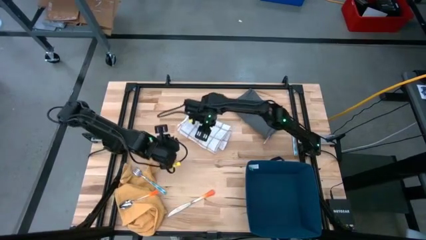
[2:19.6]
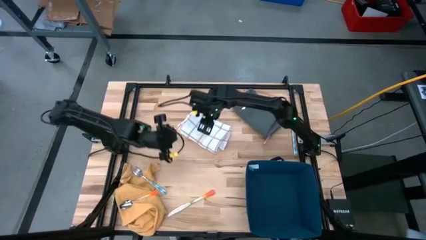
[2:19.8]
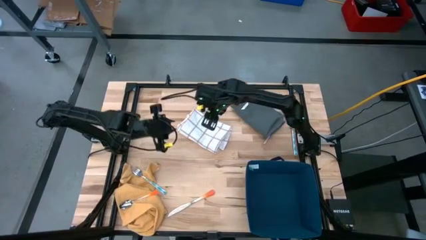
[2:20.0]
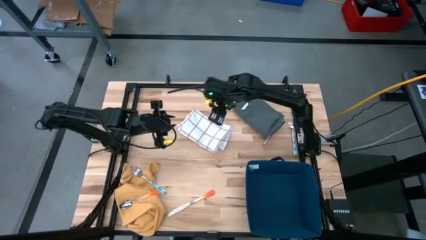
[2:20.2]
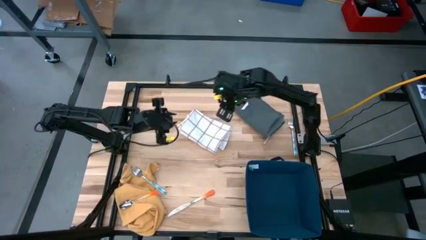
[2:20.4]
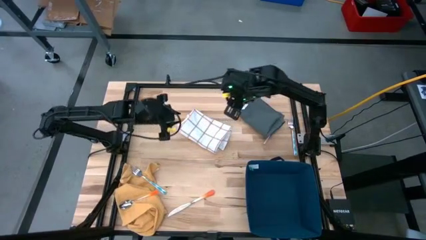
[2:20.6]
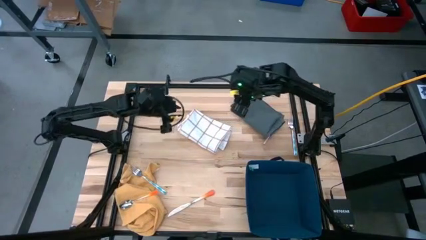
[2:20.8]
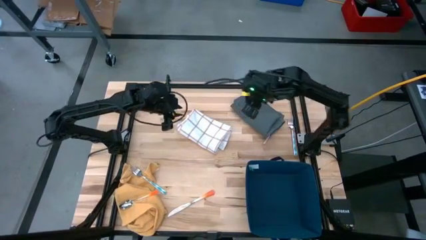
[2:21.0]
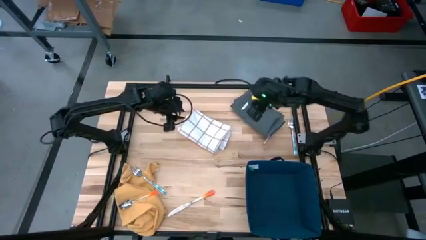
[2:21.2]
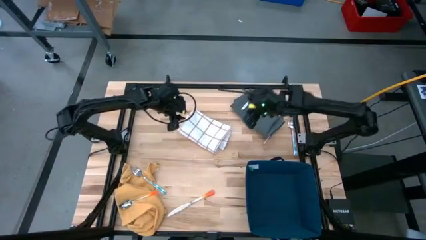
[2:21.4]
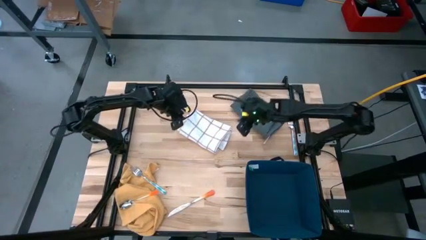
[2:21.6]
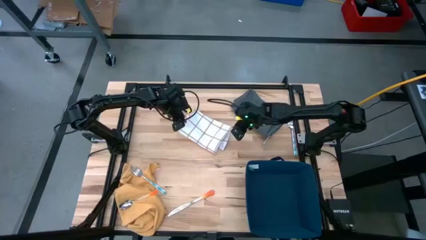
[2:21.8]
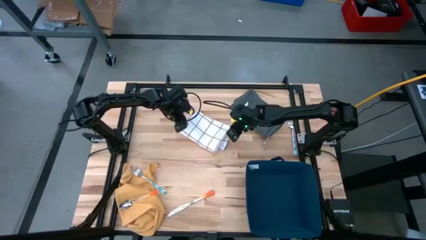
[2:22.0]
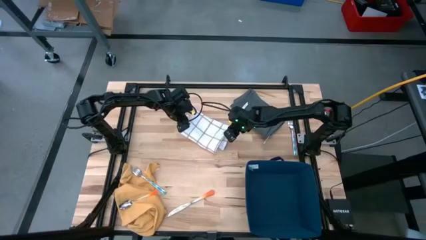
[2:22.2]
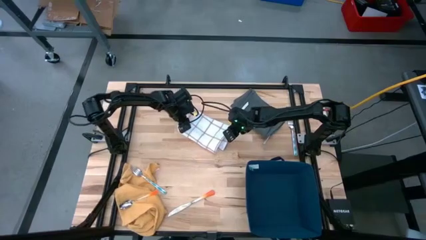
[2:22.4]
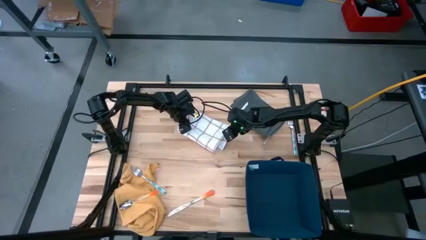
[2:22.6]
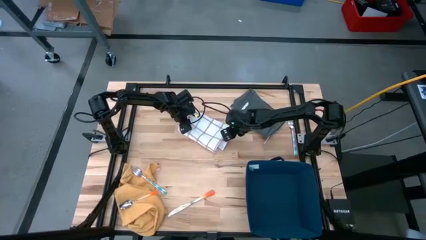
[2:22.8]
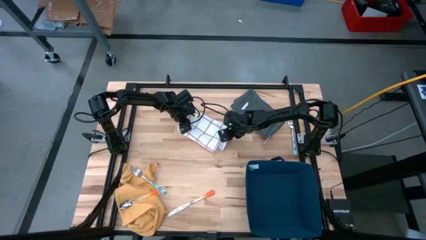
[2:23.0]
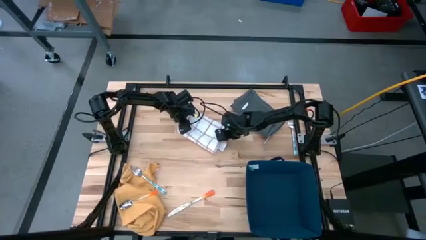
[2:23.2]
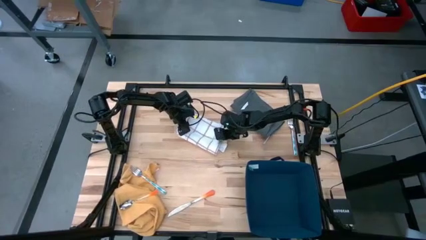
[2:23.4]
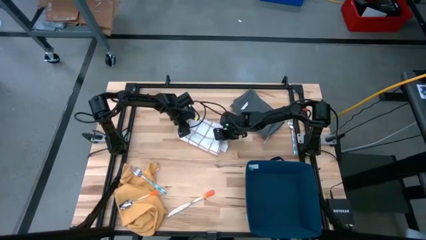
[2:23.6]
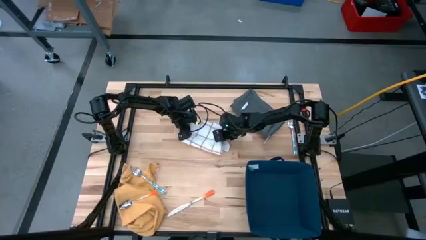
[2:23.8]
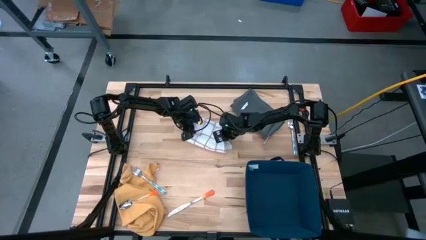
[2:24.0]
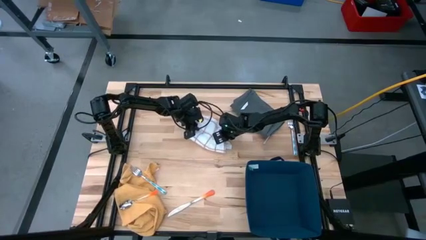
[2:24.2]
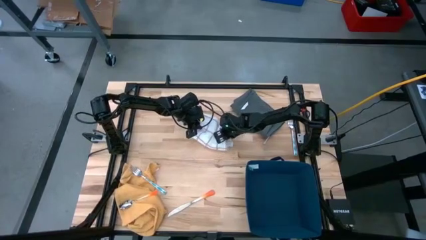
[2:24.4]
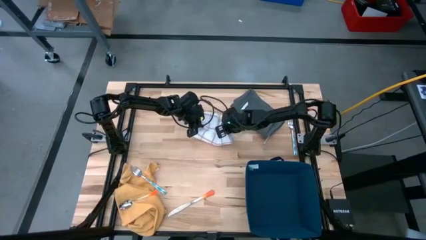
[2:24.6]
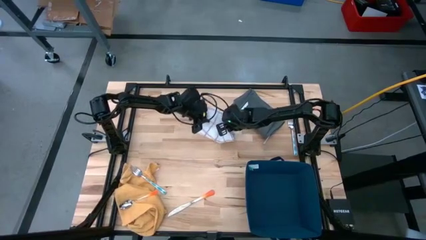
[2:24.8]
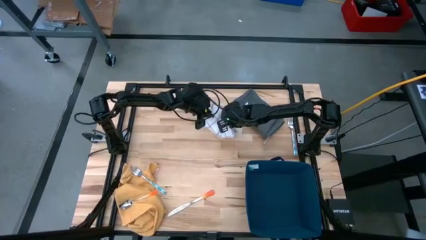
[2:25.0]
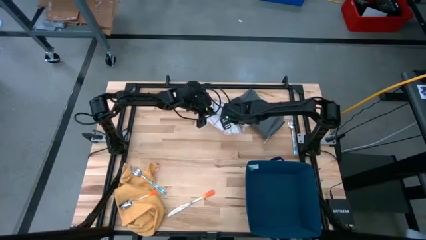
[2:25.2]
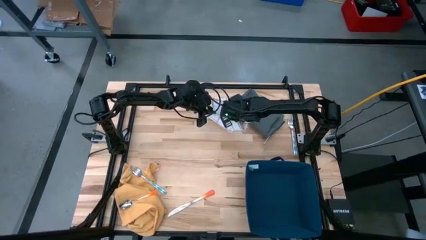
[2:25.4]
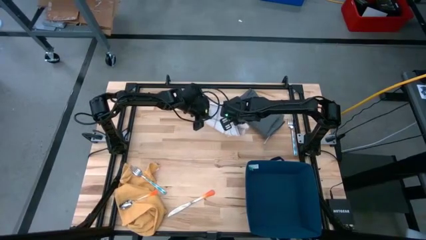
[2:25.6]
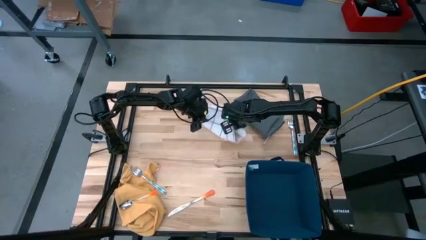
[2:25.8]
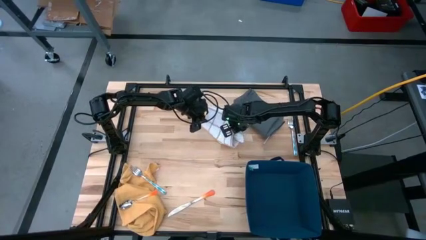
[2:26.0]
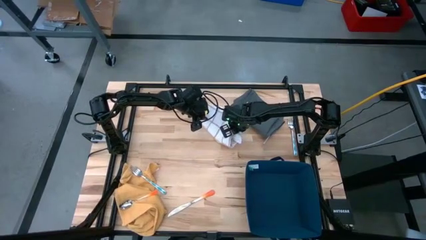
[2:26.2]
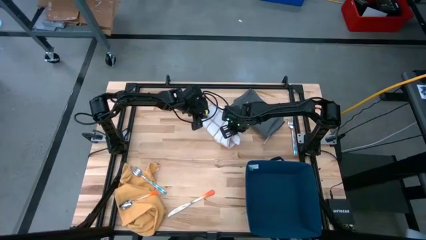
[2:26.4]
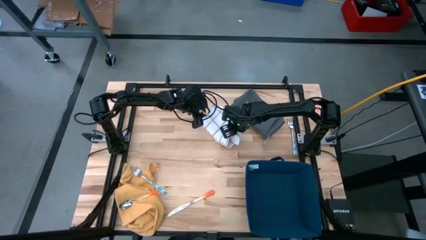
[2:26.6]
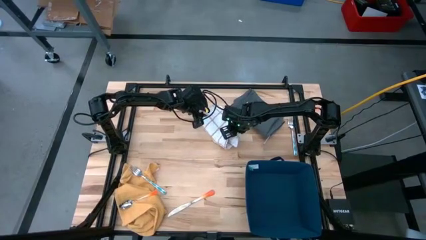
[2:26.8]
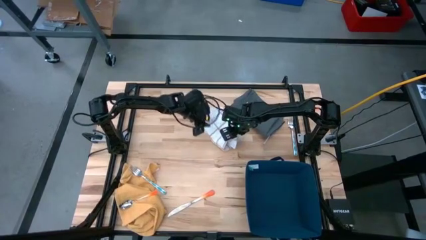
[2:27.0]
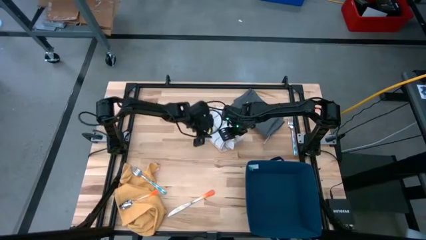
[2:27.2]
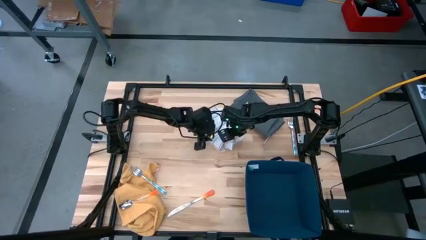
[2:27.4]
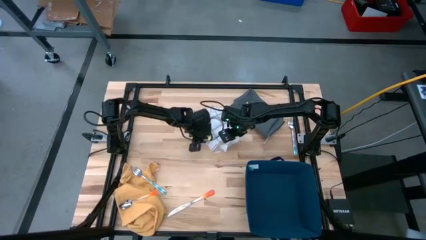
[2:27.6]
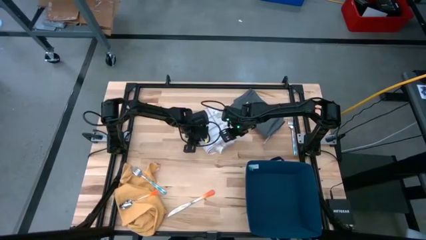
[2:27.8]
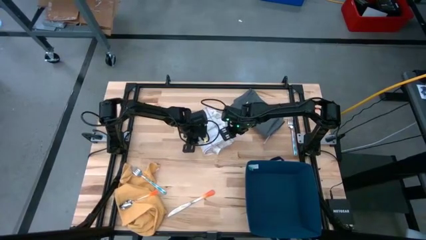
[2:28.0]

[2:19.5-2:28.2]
Task: Fold towel
Stack the white towel on top of the grey towel

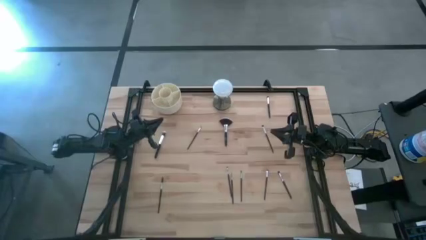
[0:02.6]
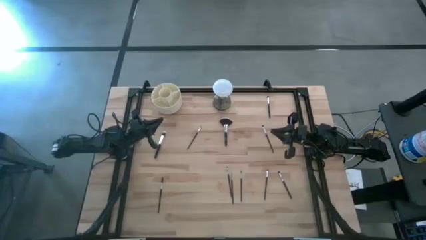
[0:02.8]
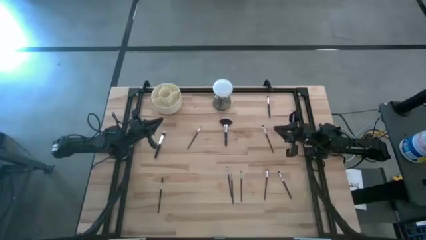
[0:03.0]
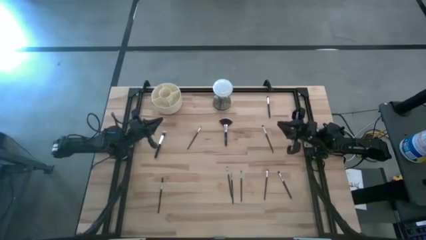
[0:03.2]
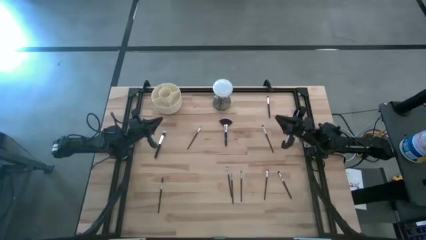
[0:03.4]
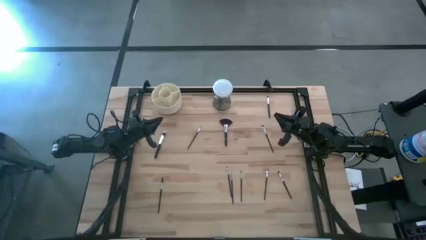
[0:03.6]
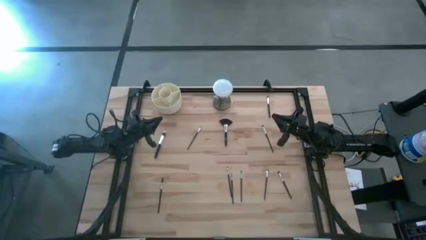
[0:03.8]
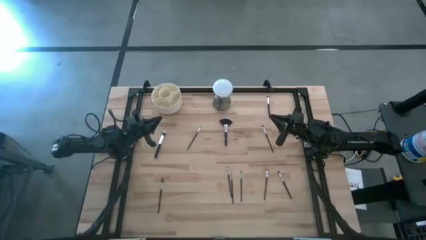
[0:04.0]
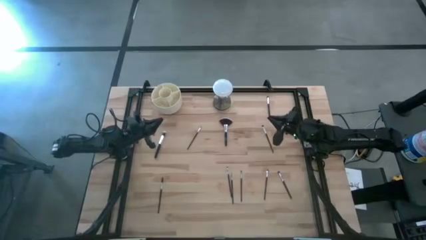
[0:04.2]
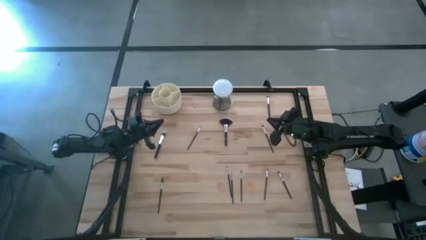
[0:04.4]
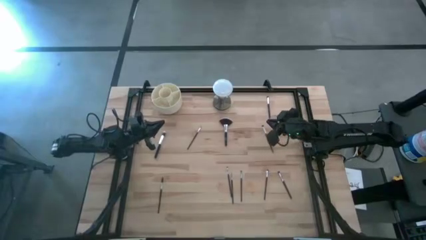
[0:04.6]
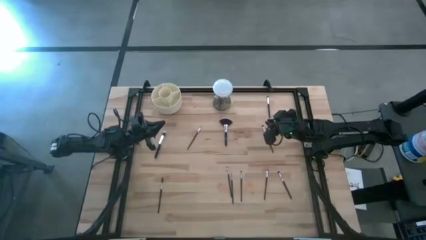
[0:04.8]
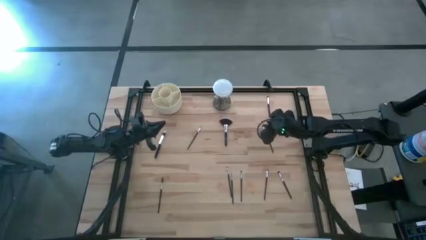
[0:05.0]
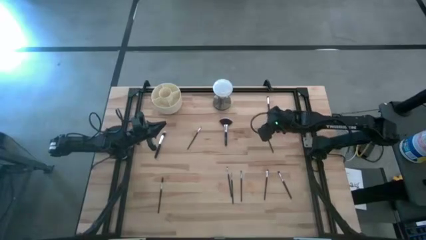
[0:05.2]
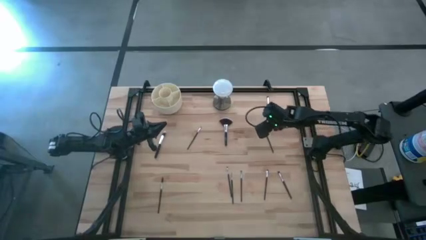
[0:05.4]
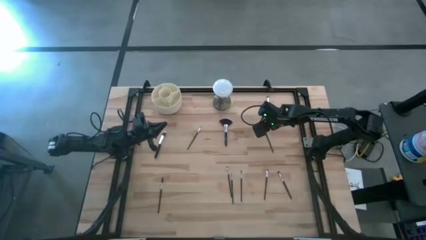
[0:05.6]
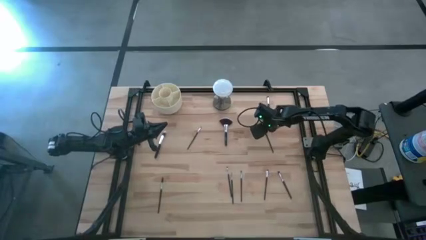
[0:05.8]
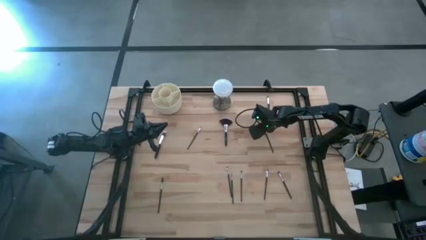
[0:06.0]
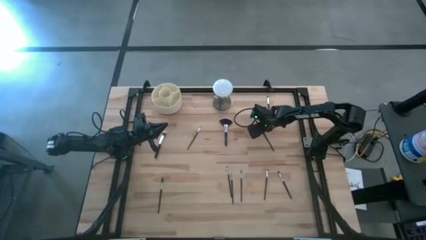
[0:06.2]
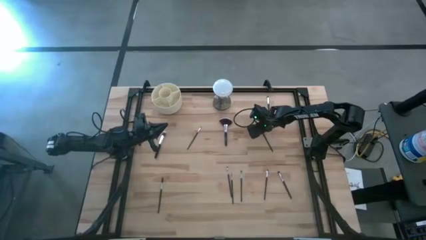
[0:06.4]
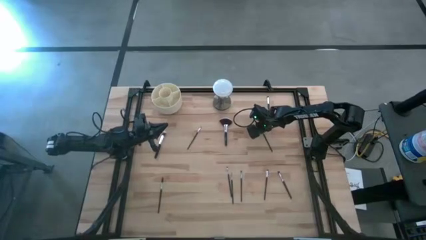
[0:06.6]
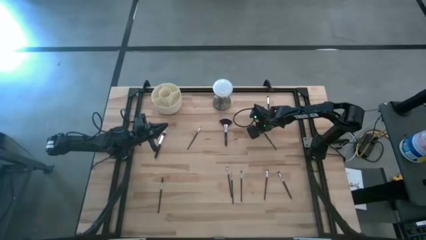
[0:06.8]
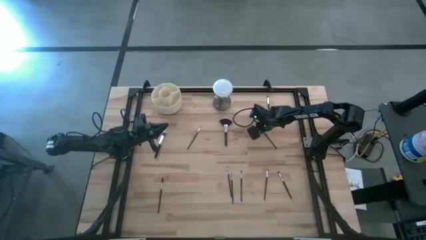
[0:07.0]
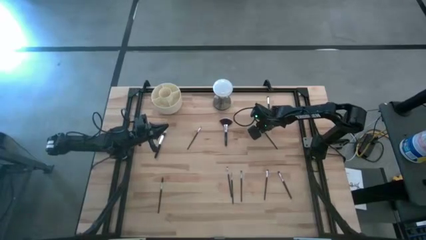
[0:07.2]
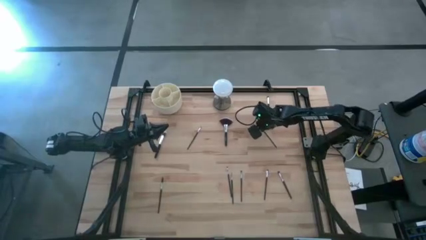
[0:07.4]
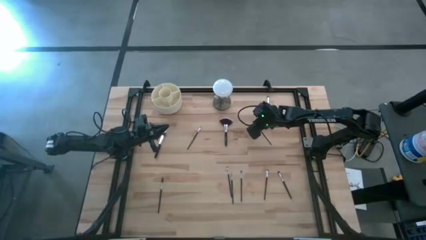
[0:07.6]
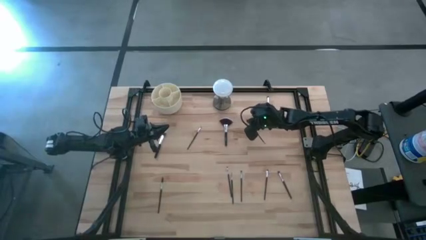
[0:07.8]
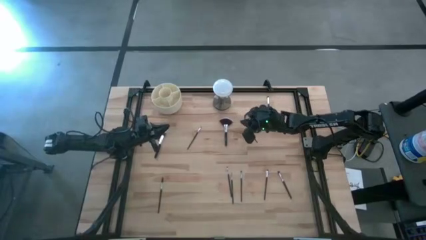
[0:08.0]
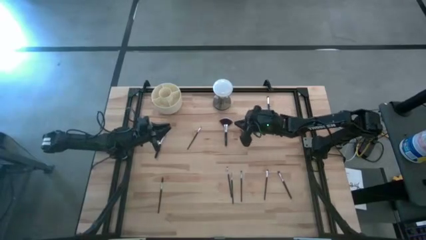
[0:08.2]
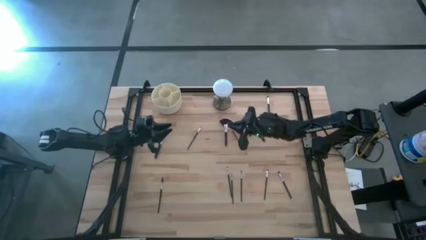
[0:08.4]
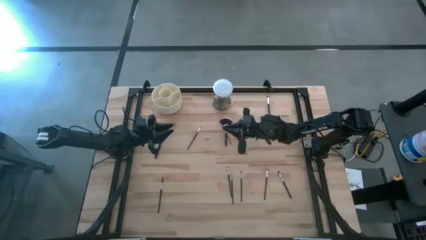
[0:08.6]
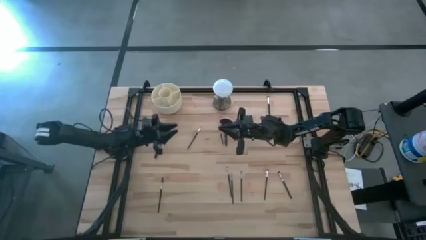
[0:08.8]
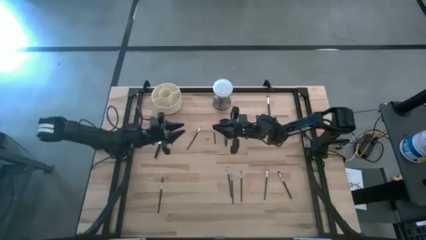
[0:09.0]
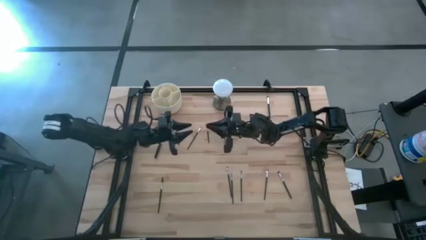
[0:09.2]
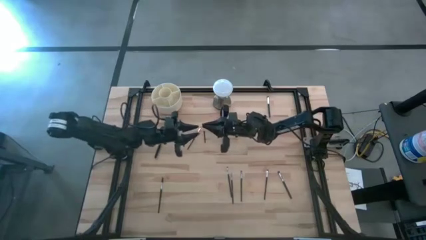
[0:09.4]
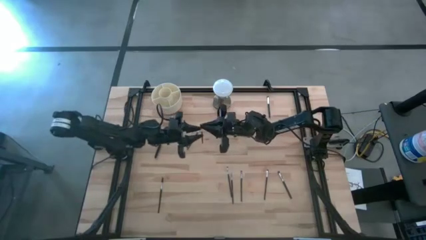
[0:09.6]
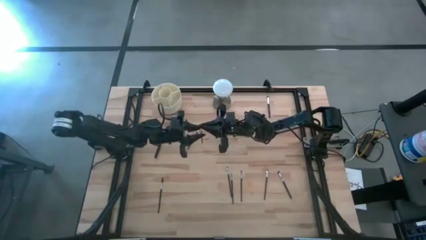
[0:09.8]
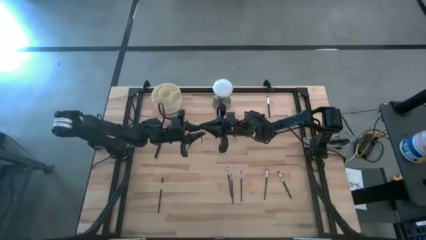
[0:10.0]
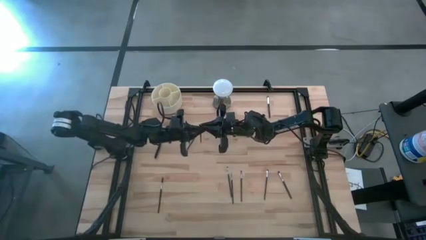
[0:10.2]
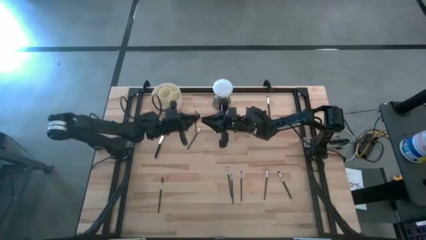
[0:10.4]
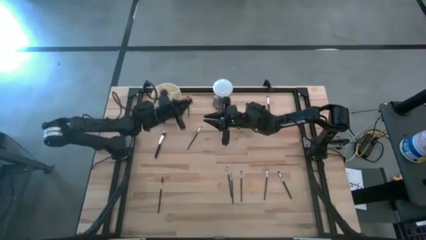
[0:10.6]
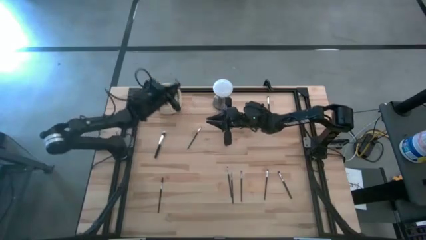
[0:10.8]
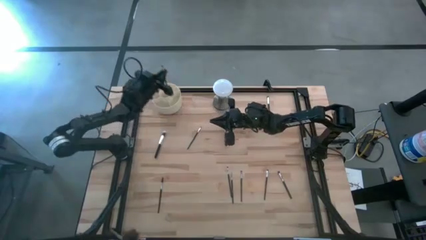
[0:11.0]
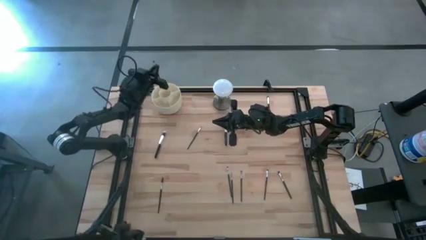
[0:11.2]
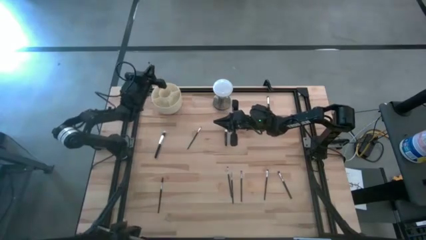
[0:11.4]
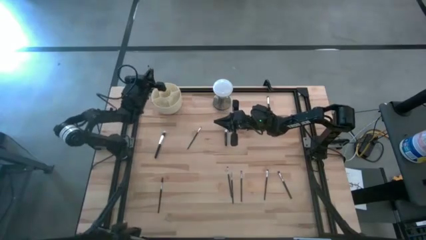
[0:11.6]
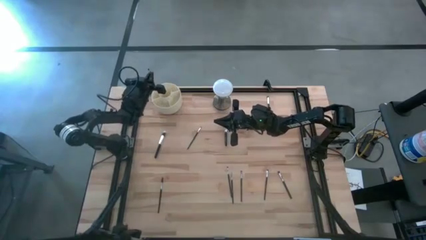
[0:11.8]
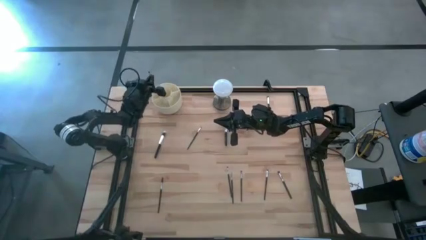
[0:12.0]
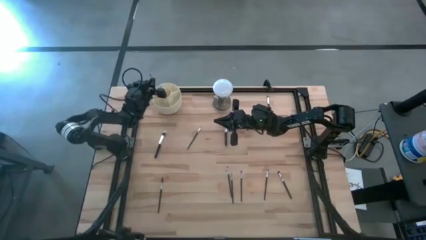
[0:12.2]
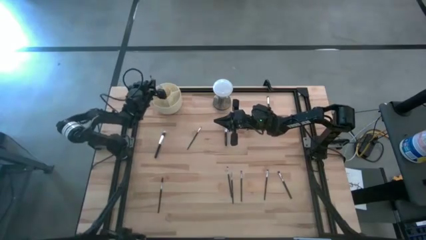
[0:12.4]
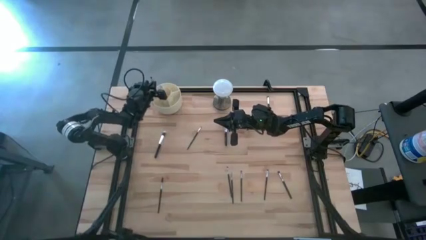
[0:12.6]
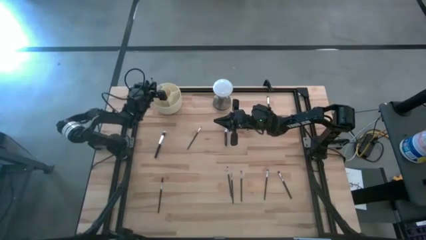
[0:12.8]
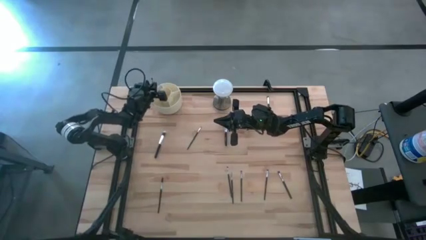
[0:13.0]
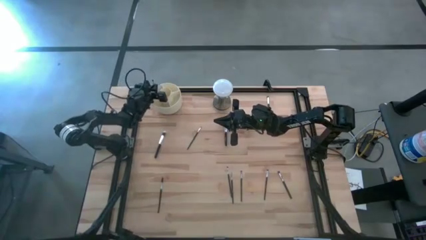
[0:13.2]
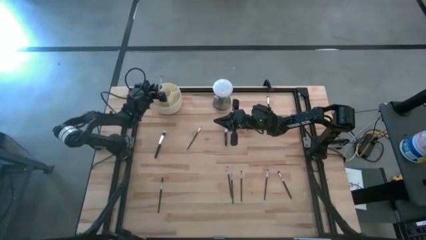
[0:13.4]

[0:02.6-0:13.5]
Task: Put items in baskets/containers
Put the eyeshadow brush into the organizer
